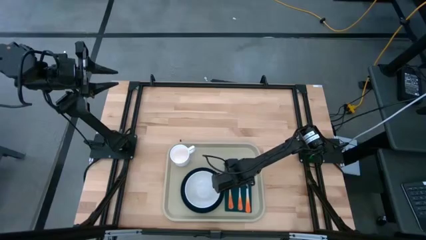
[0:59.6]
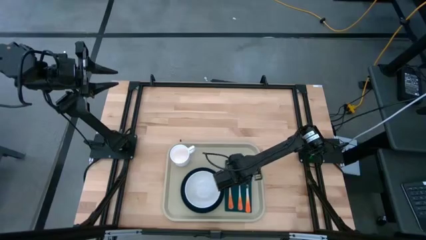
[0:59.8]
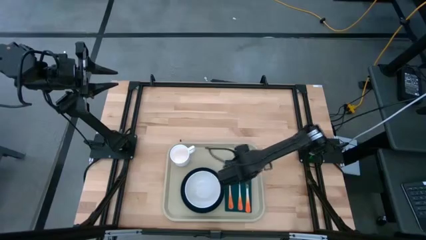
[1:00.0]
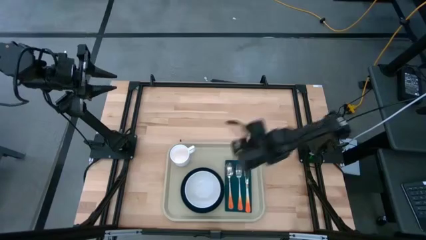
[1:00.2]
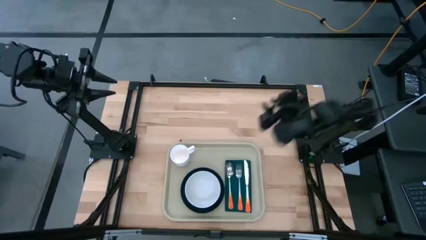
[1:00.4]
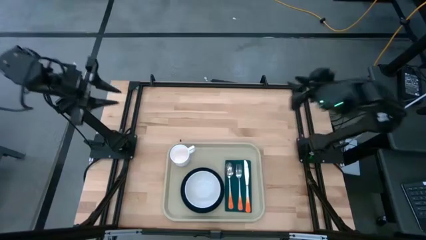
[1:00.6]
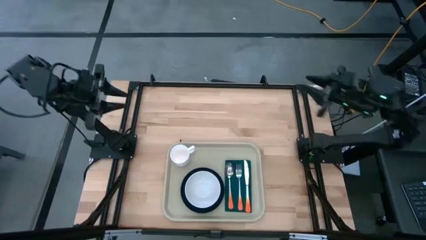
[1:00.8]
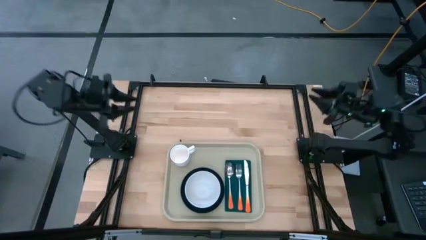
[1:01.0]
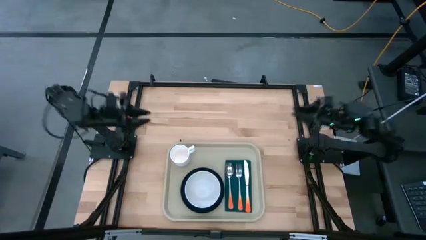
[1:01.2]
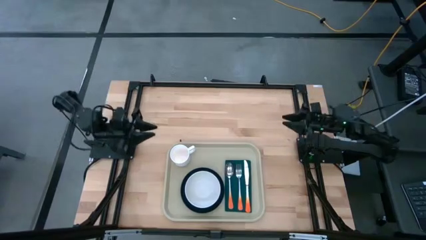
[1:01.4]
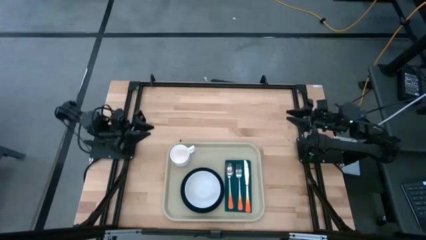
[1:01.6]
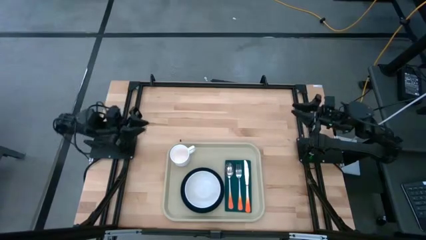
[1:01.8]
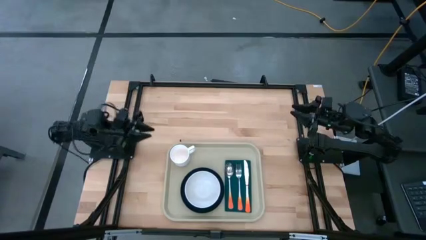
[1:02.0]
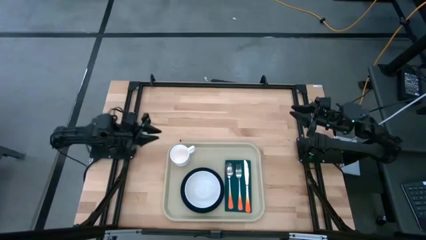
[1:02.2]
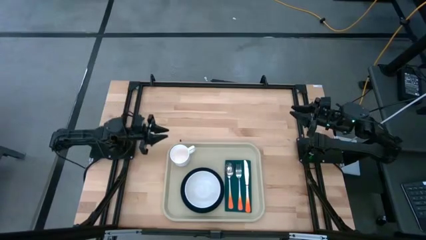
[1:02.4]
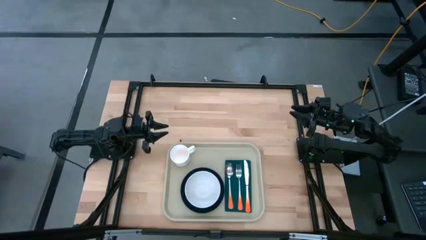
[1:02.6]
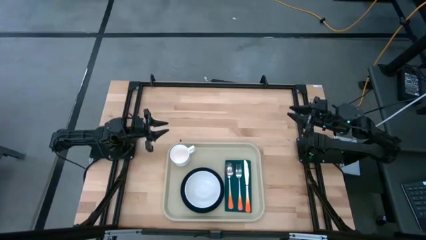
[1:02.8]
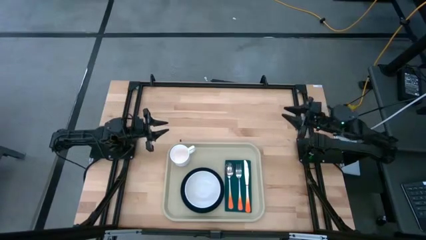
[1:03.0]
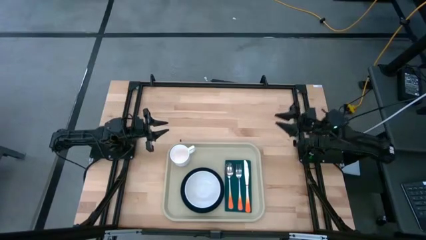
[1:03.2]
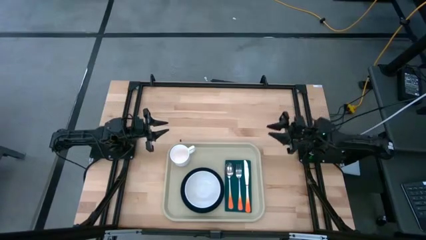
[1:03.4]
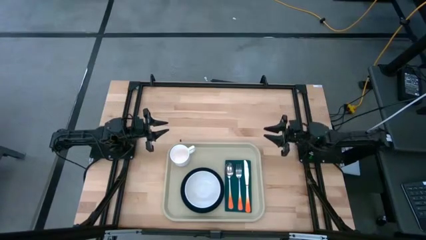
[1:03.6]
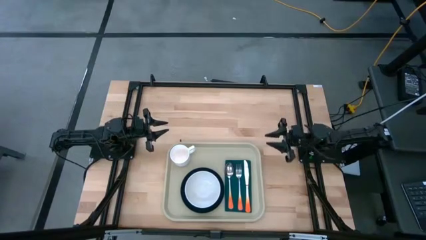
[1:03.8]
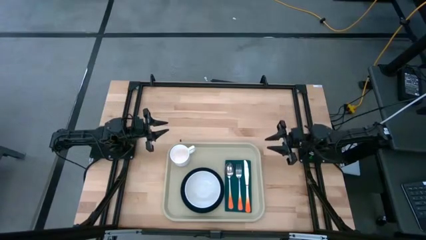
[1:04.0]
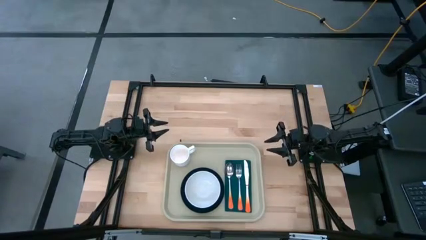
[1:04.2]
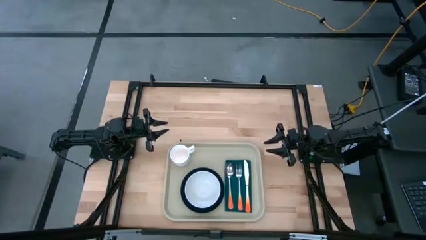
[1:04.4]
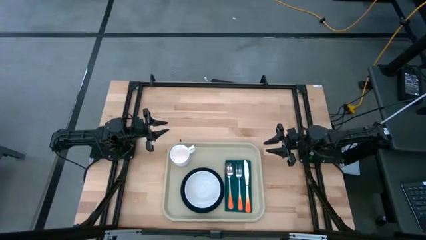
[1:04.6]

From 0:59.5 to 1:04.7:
Task: Set up tray
Return to Home Position

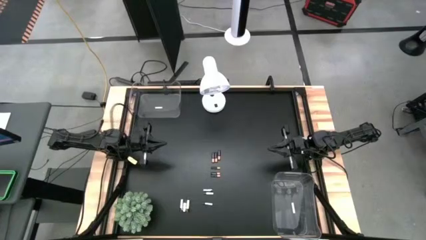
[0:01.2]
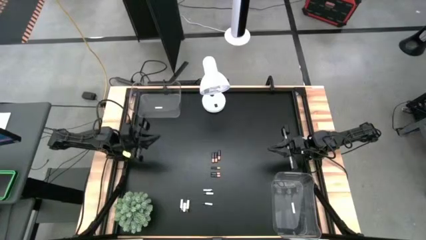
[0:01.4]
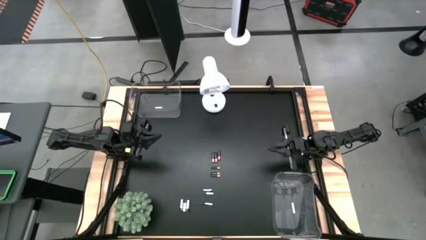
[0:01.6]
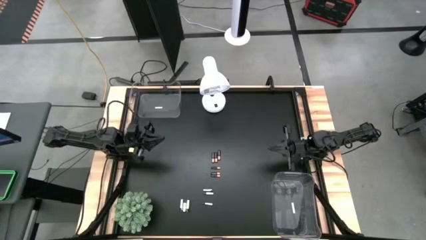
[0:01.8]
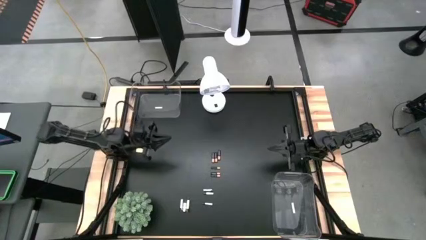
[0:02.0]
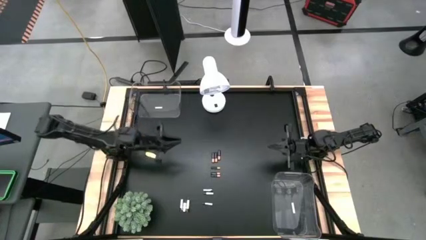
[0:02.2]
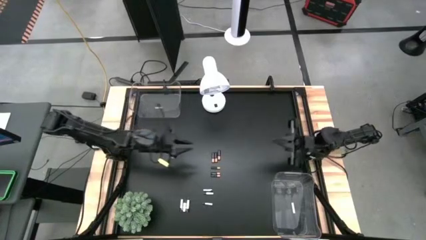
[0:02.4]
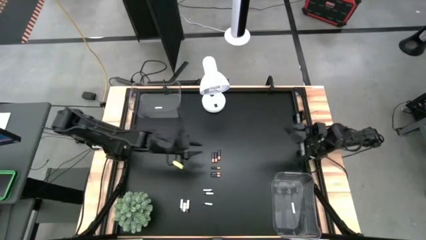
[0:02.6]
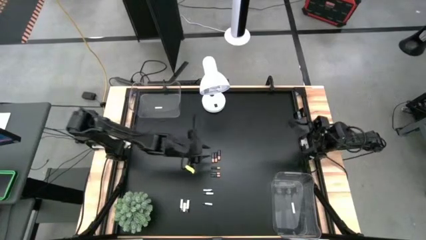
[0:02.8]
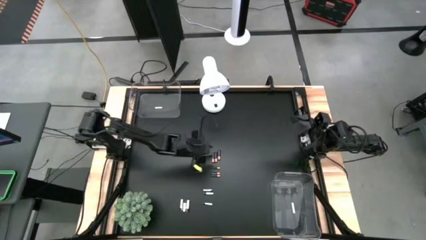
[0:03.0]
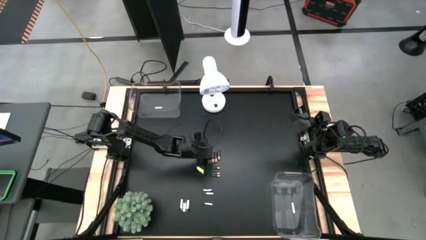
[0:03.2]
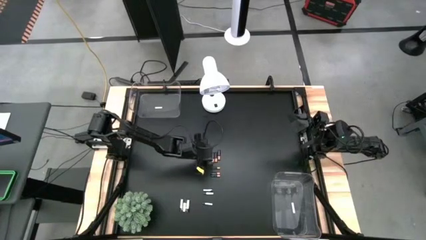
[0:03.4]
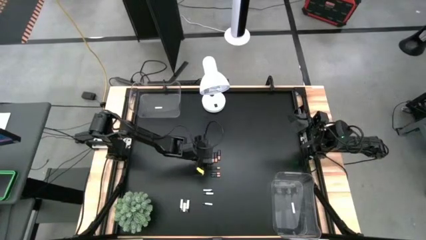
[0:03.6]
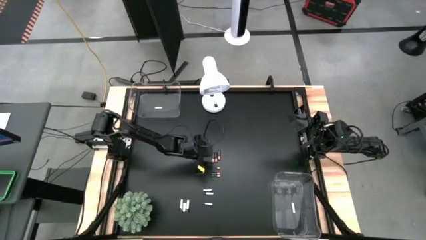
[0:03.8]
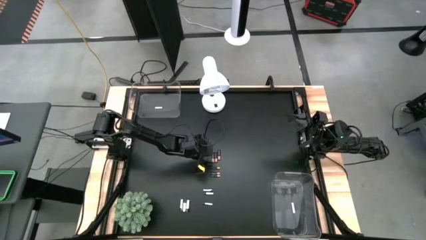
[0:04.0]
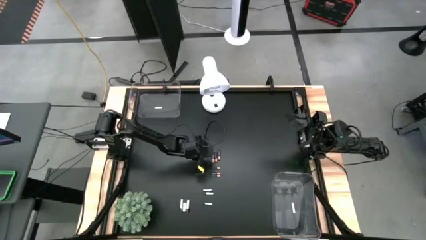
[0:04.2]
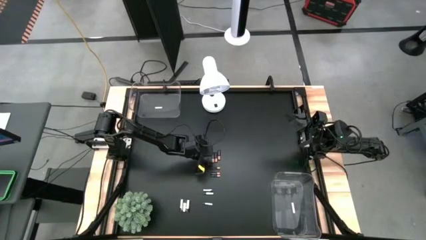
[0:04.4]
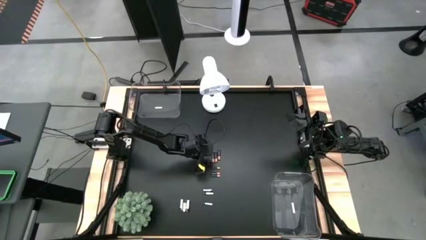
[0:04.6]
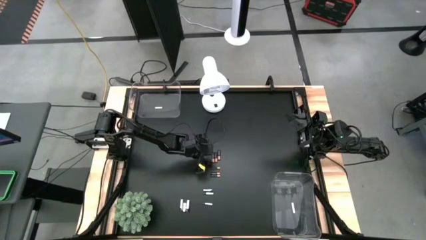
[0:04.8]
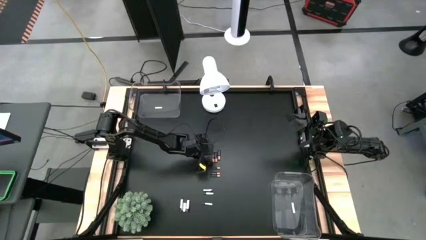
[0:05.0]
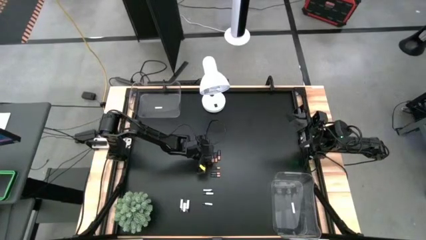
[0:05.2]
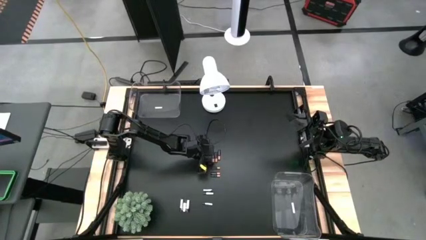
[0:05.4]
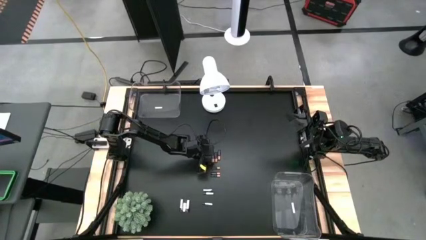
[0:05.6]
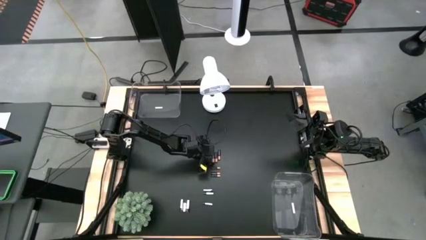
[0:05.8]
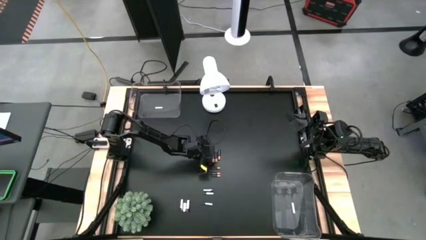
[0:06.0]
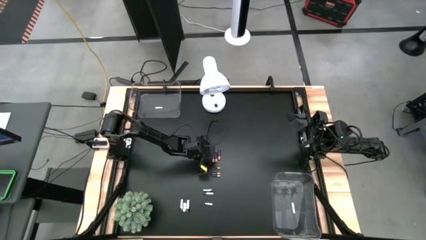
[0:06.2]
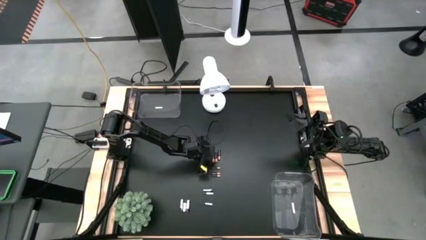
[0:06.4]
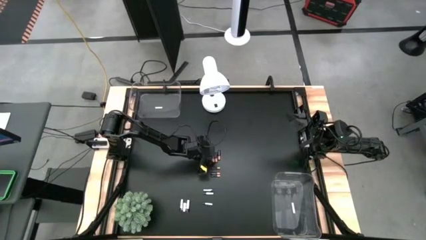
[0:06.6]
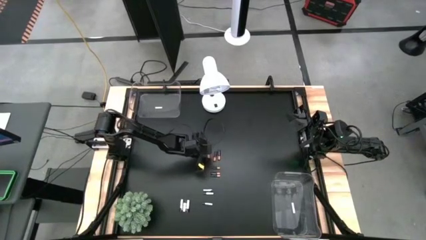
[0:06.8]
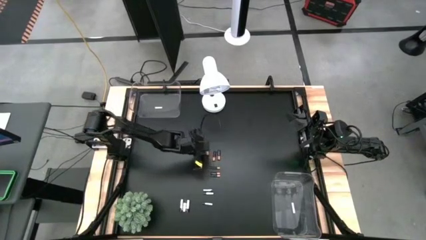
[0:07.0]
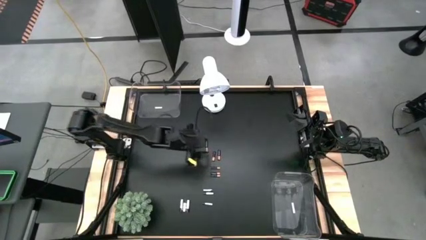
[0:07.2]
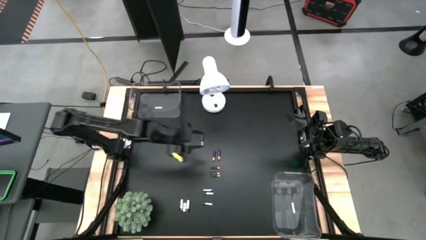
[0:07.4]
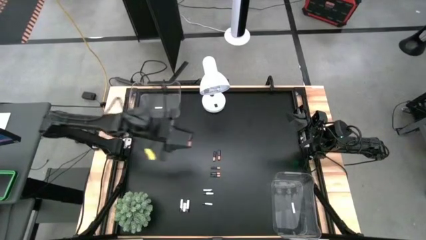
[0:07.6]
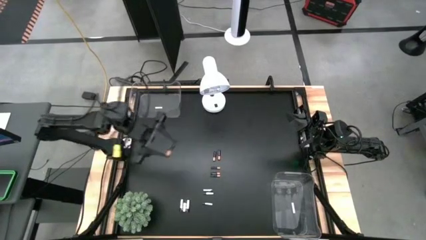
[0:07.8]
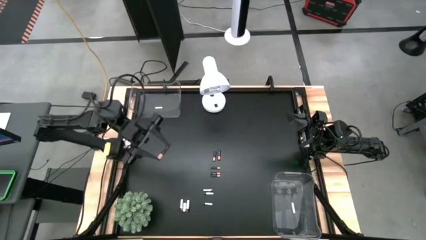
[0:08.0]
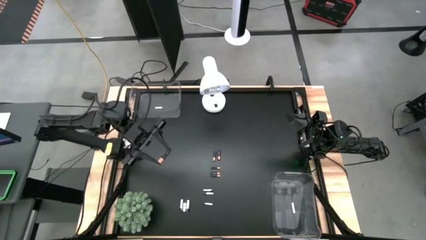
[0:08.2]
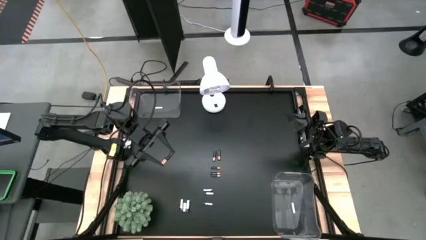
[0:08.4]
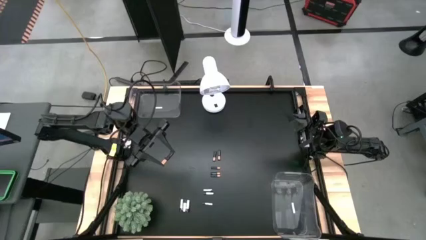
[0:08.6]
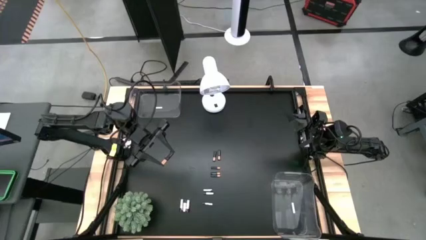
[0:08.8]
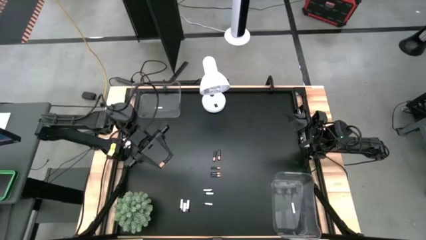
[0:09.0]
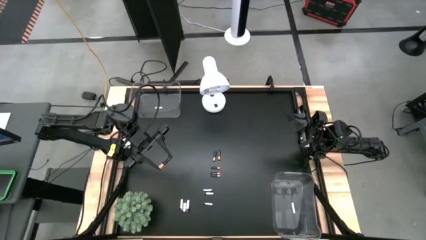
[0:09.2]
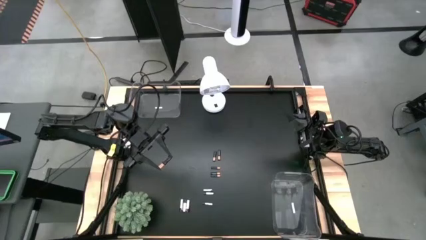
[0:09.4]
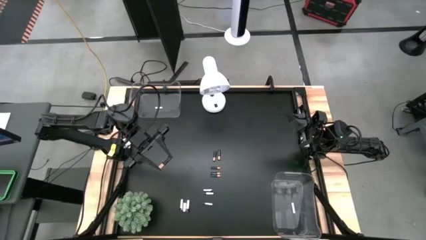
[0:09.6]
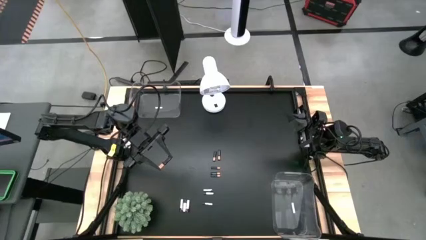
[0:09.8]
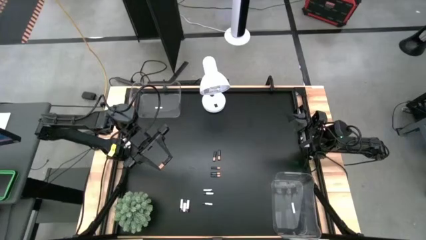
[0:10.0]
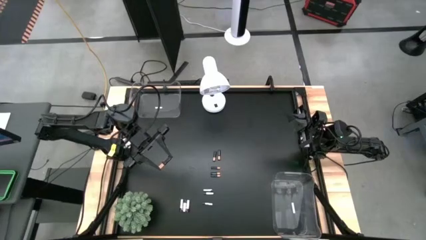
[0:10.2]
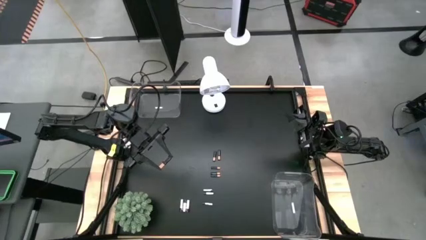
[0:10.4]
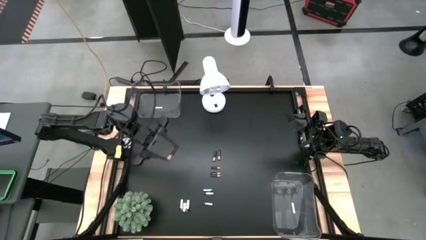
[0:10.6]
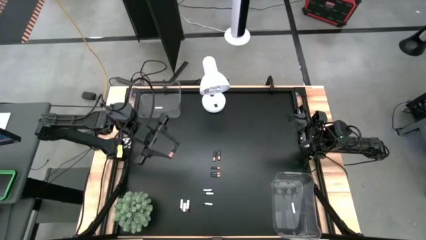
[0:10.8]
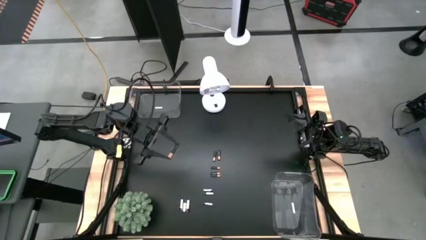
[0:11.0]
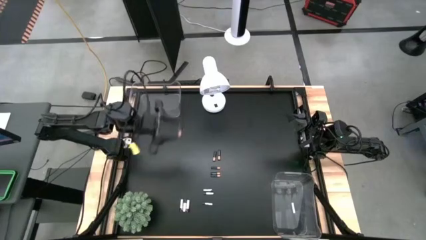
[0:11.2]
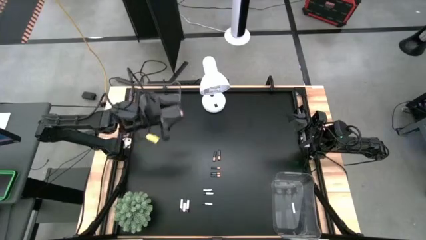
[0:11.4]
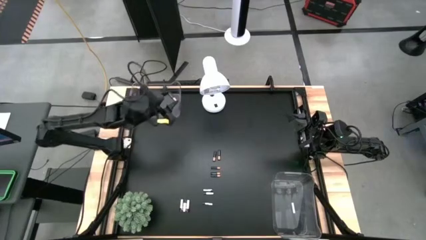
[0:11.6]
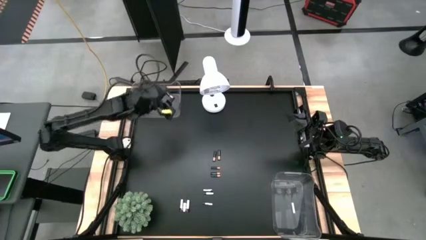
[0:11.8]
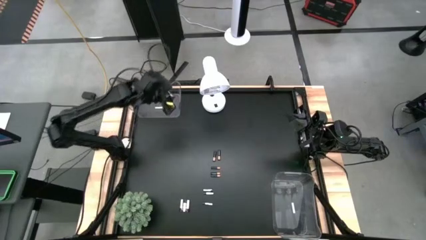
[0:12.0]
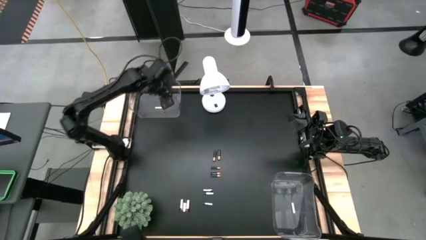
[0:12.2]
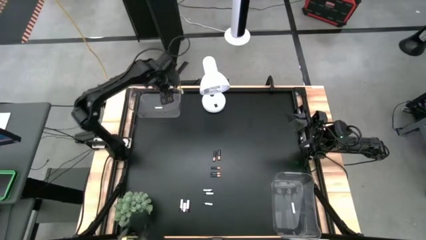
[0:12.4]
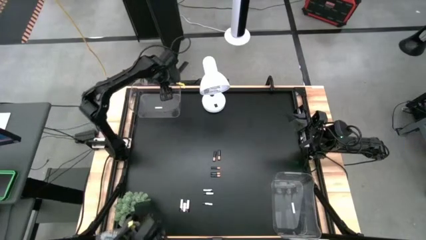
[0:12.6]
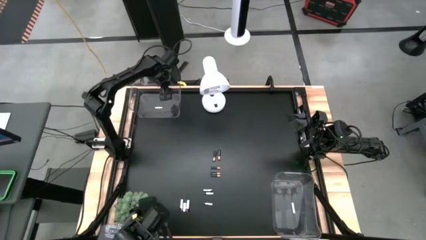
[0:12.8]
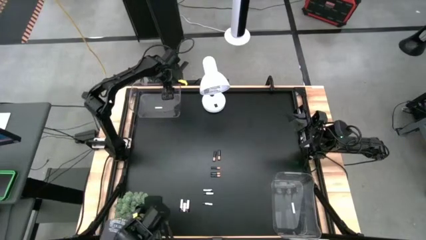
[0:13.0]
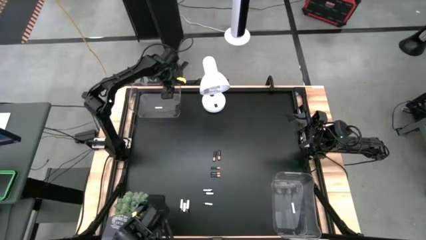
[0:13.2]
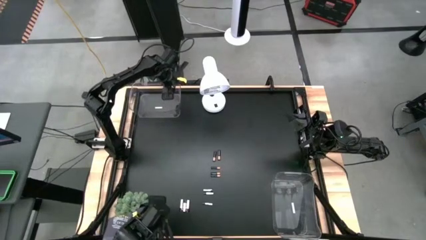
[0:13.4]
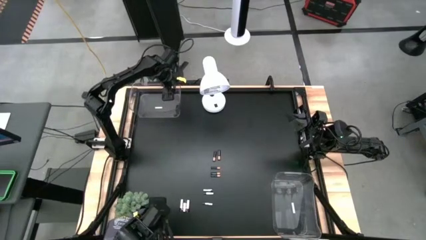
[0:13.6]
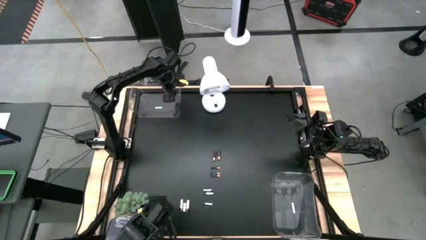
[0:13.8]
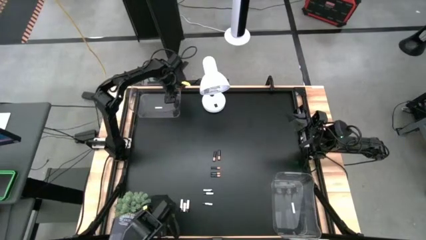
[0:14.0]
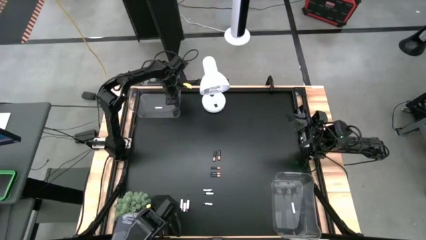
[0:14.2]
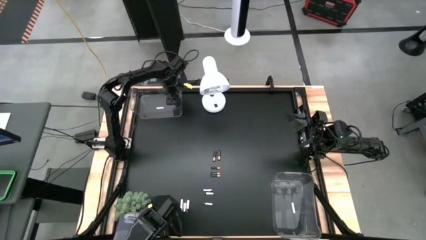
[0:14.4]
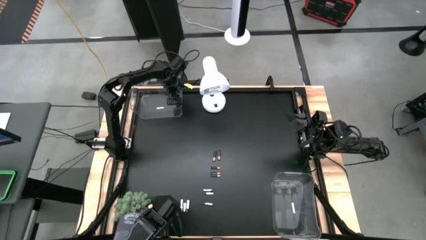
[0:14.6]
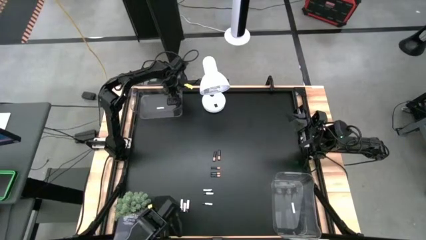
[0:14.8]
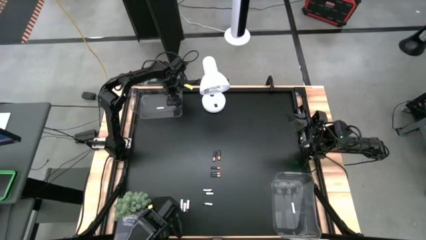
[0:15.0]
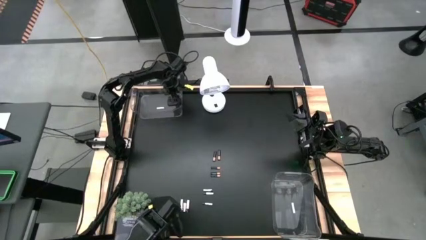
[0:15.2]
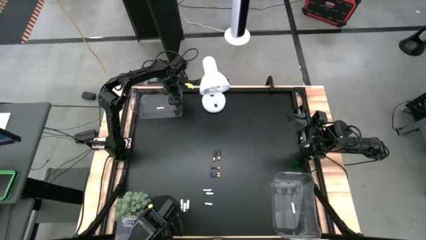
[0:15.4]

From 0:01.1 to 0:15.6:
Task: Sort batteries
Put the black battery into the top transparent bin
